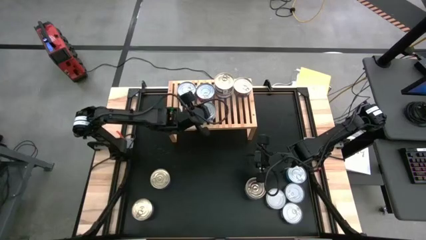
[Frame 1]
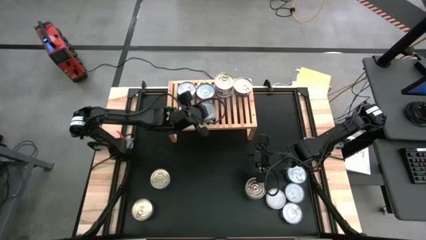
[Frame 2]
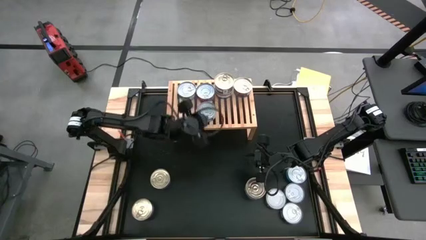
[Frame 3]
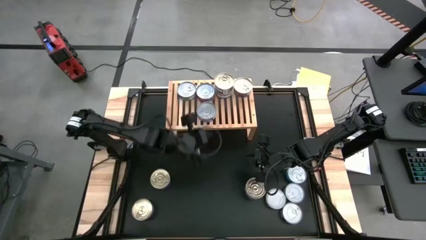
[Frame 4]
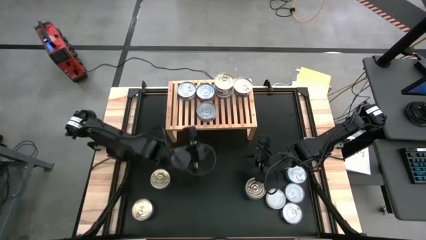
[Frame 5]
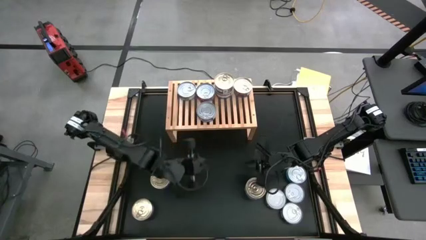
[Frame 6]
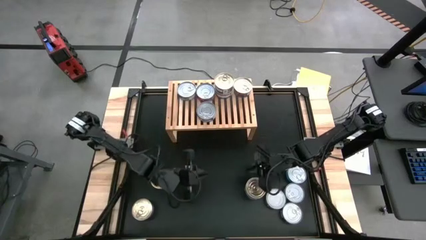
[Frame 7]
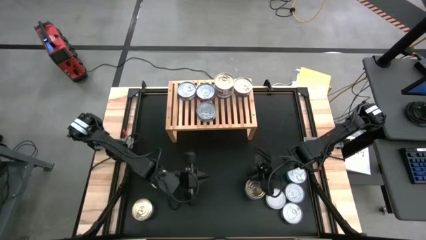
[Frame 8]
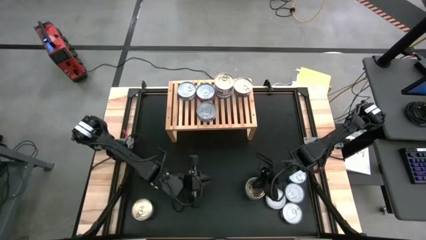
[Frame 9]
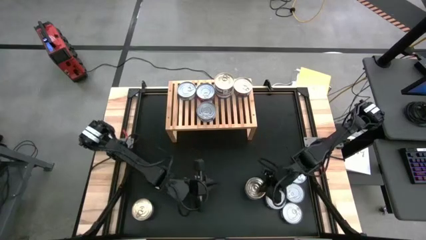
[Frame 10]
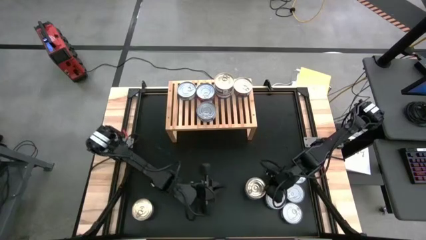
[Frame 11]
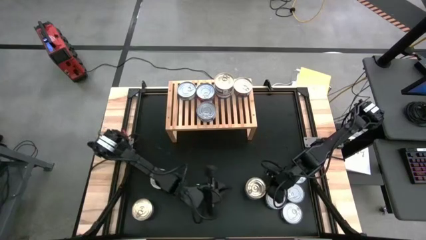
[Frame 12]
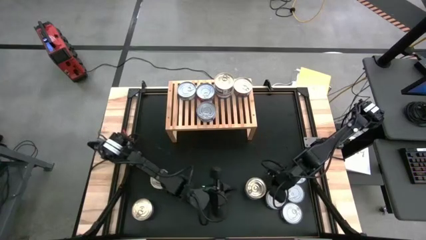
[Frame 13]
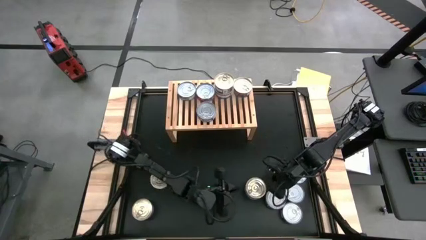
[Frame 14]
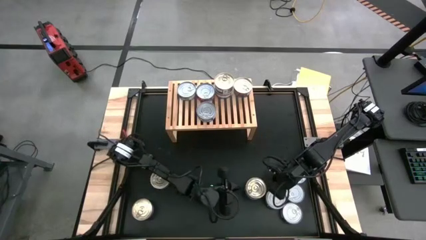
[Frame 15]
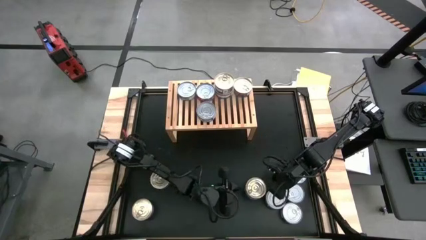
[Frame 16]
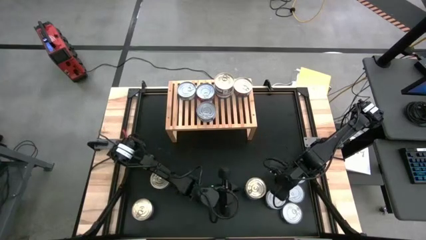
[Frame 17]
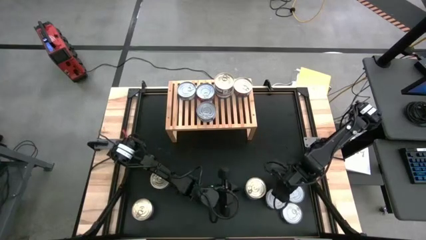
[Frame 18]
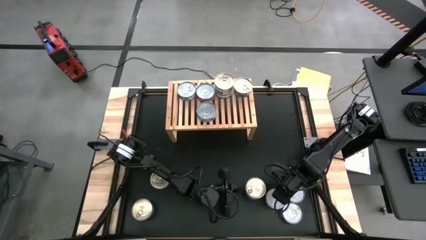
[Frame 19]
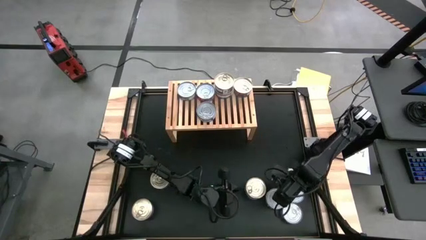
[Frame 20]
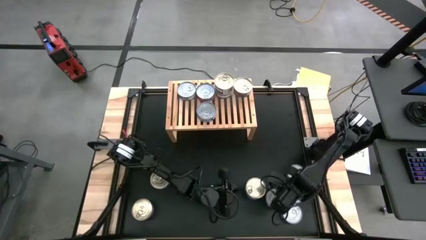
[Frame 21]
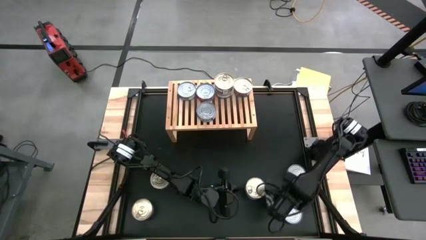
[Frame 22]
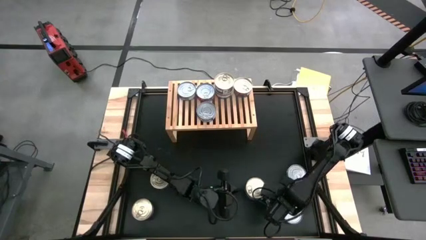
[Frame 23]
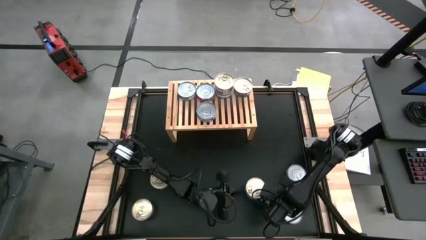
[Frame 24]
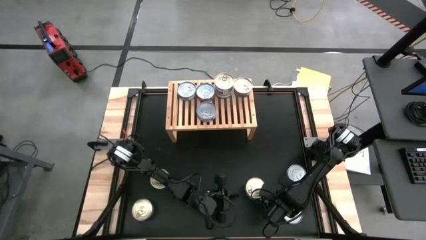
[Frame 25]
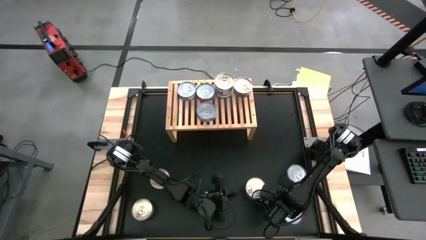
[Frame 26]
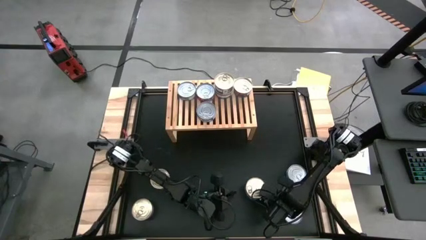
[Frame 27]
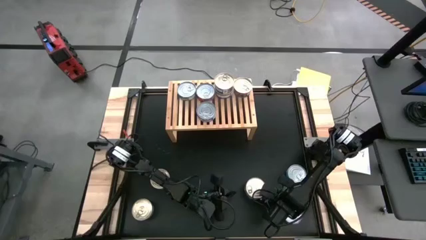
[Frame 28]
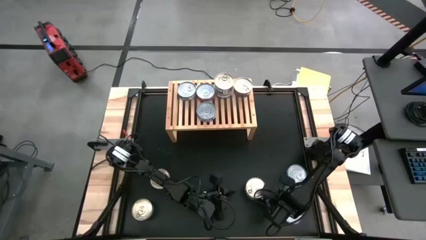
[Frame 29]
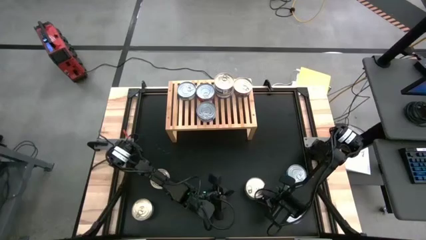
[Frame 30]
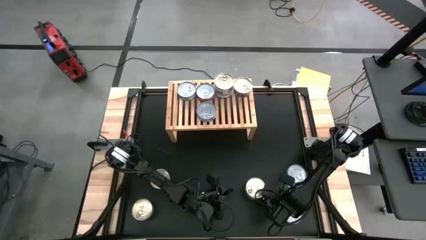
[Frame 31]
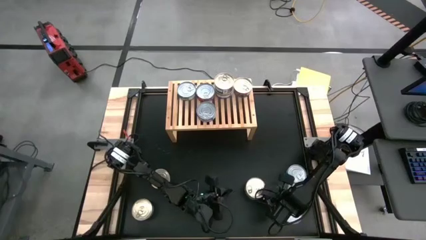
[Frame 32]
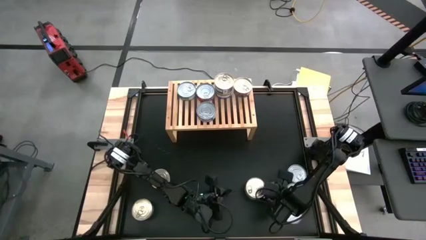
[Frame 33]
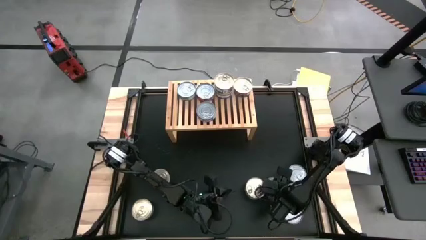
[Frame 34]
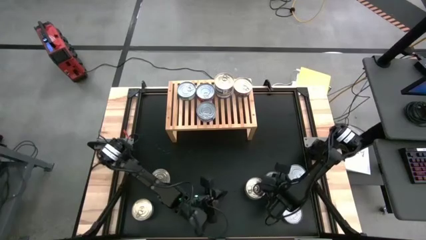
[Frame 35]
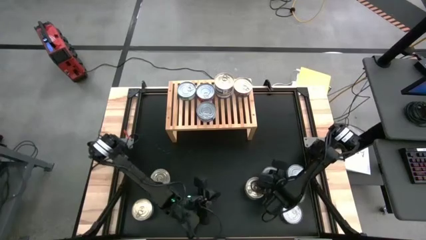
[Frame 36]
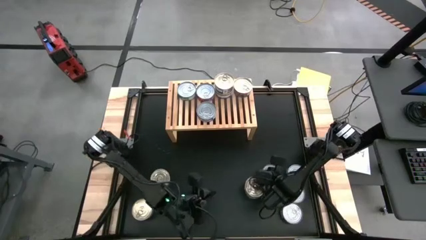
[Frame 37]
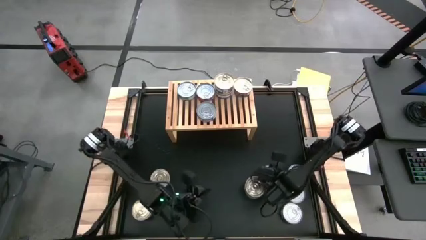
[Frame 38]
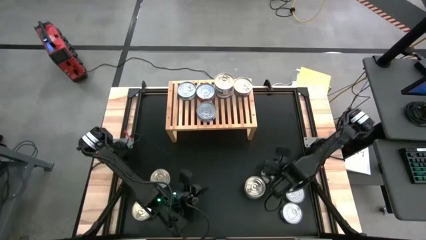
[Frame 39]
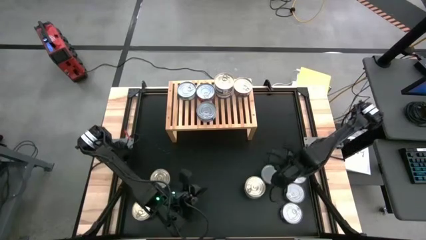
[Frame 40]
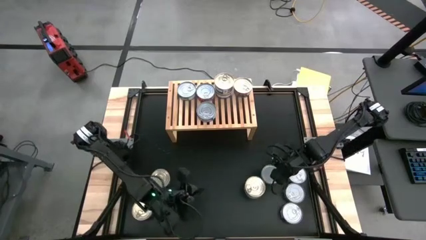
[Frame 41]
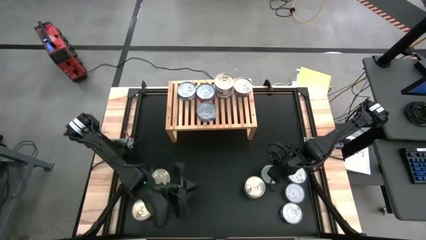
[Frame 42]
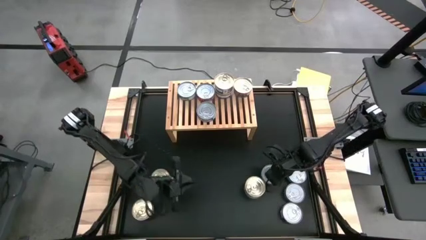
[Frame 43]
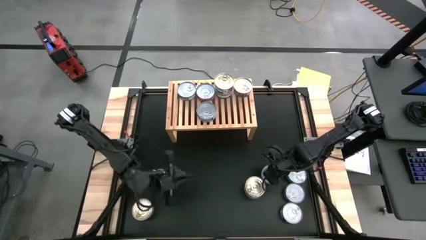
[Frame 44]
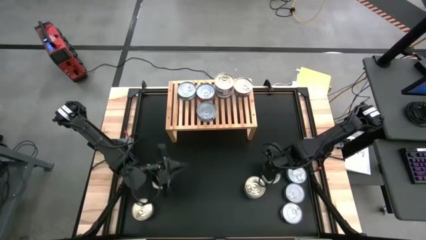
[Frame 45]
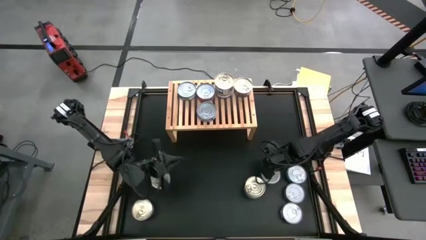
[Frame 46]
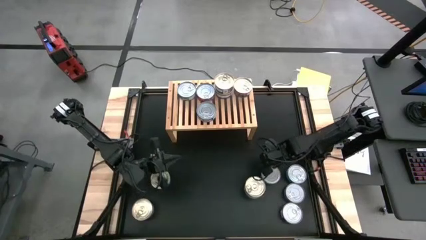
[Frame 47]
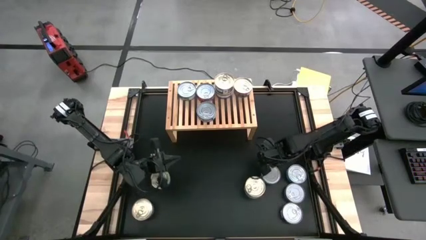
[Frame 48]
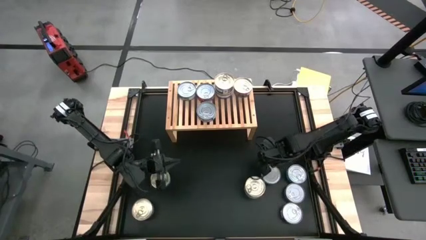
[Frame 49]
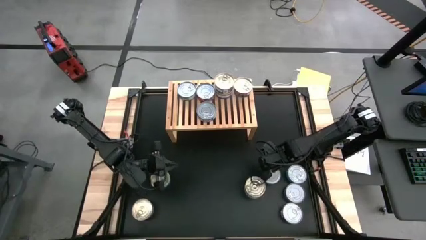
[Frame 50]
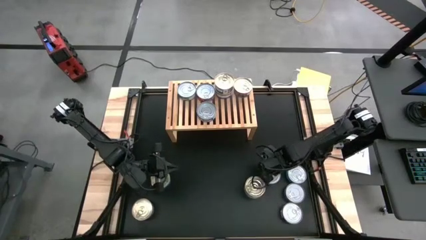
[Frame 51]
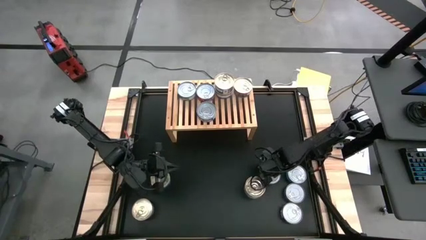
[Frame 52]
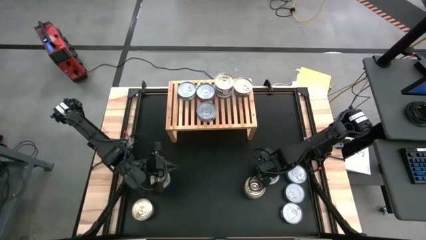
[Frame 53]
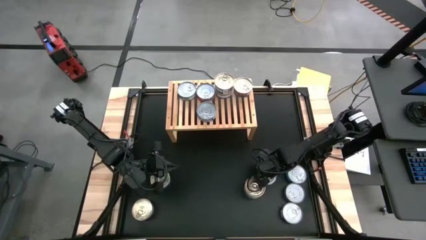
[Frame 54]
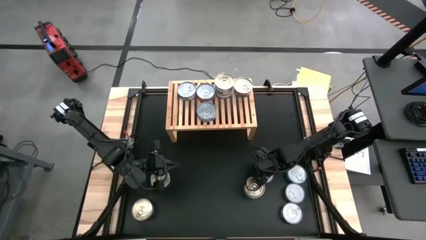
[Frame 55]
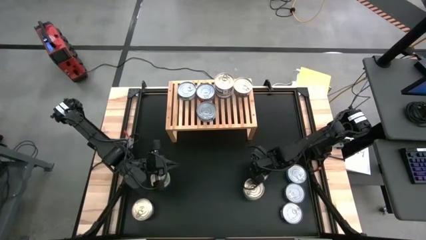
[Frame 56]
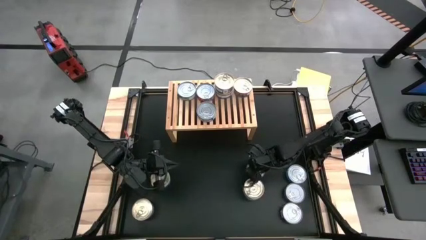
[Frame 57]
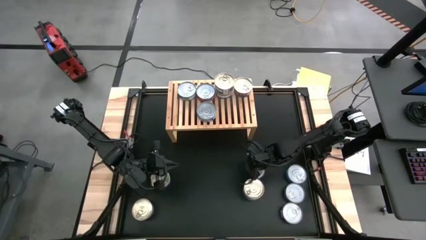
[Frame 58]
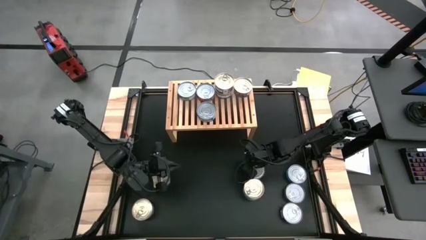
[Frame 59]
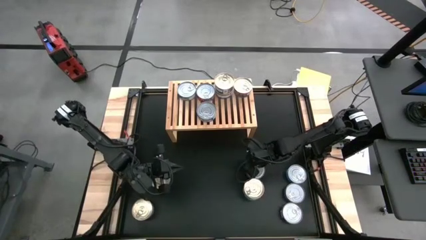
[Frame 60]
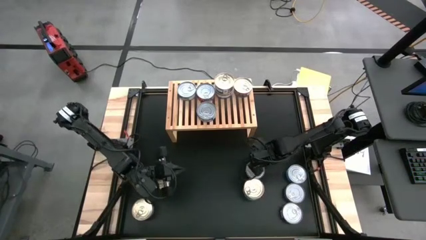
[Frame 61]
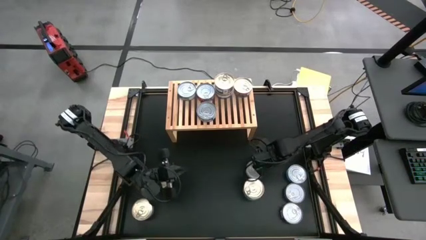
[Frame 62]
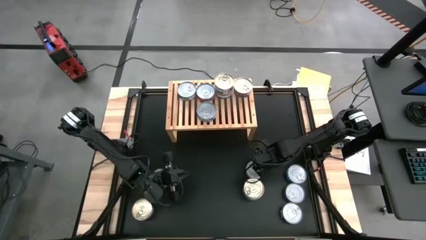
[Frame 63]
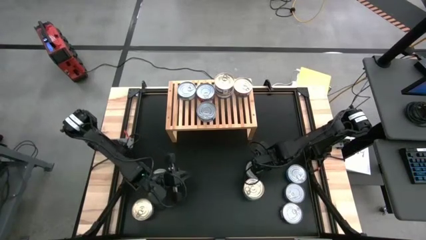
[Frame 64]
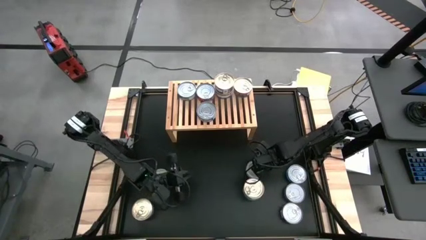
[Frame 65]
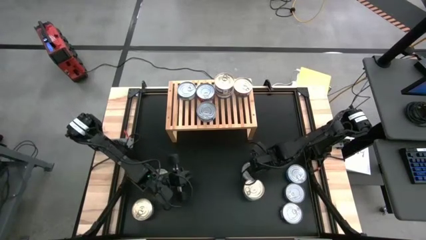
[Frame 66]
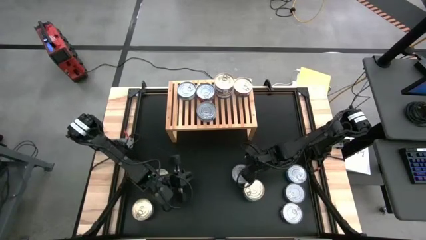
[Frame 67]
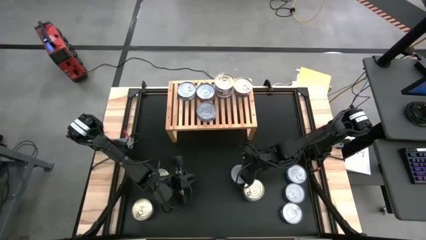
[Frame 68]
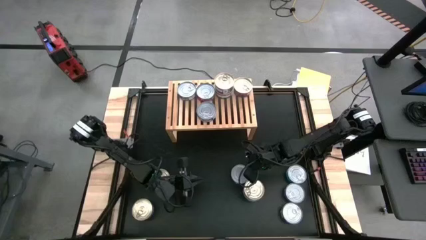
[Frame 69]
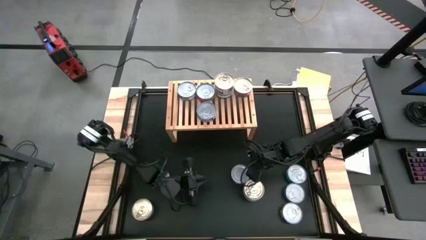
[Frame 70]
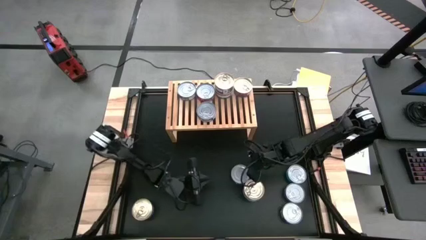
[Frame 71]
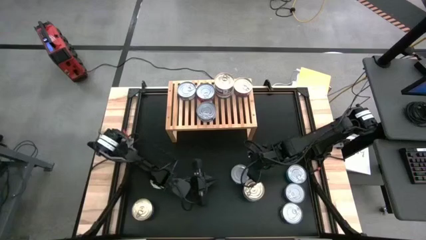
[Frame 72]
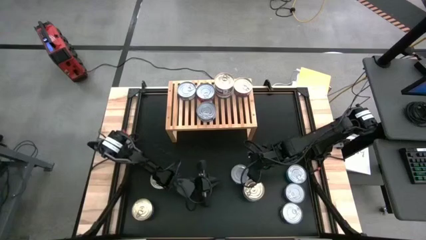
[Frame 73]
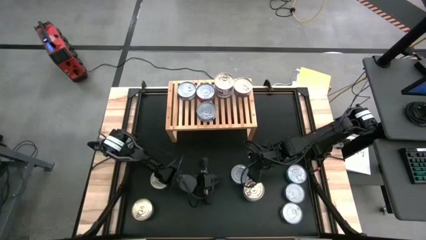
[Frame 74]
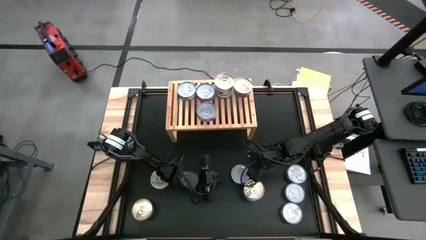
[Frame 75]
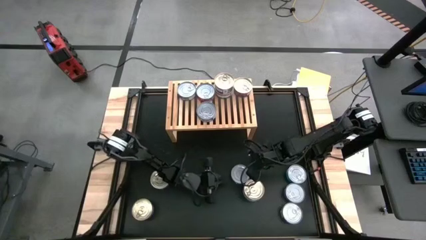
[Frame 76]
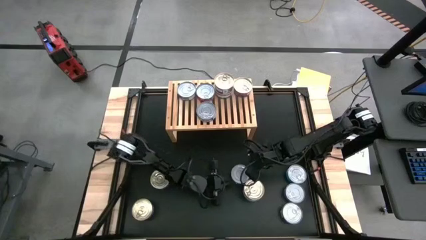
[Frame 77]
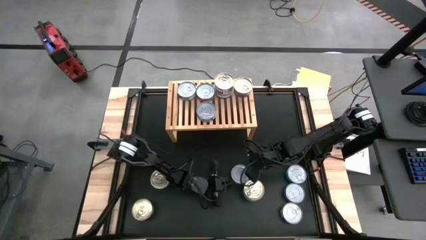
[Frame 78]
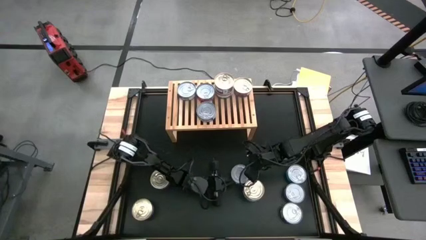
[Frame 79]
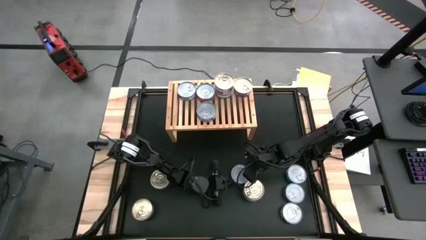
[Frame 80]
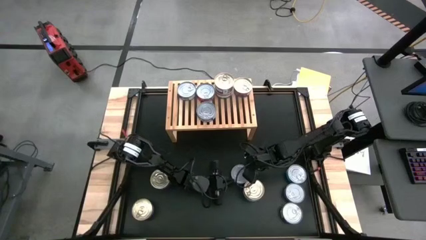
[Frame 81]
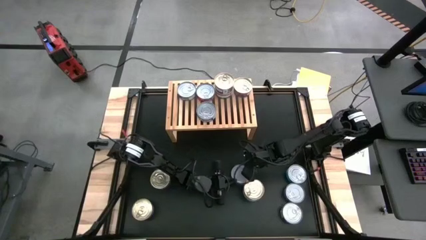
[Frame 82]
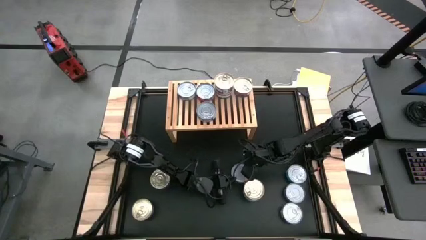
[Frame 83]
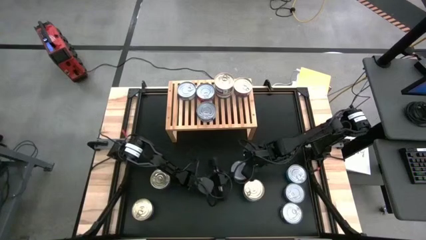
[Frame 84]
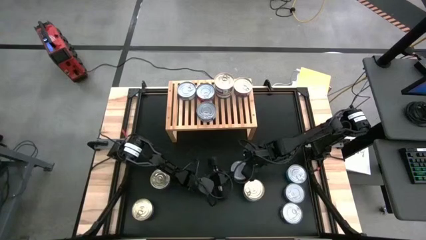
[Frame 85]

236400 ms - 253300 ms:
Task: Stack canned seafood by type on shelf
Put the white and green tuna can on the shelf aligned with the other blue and pink tuna cans
